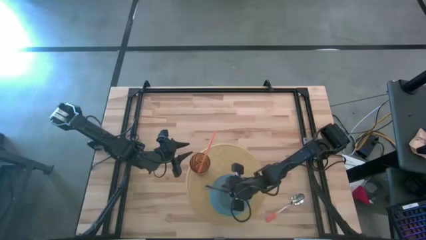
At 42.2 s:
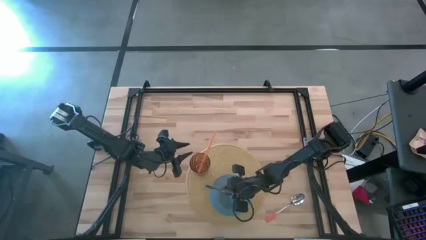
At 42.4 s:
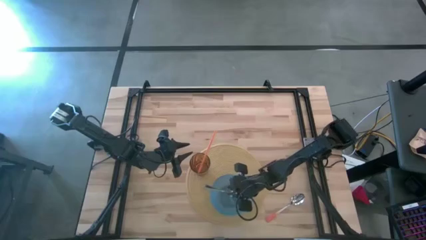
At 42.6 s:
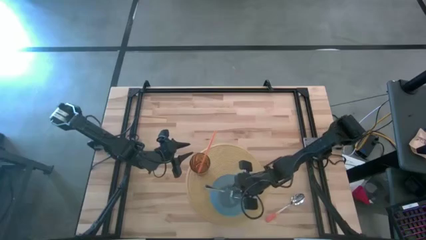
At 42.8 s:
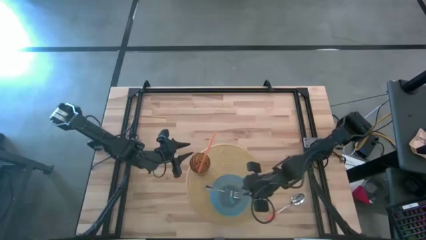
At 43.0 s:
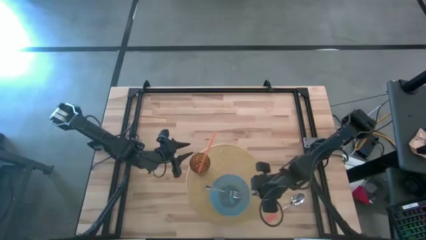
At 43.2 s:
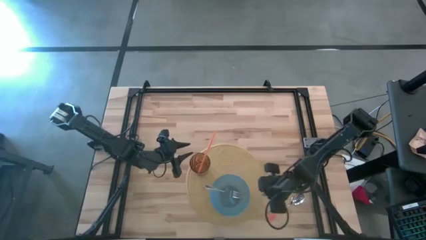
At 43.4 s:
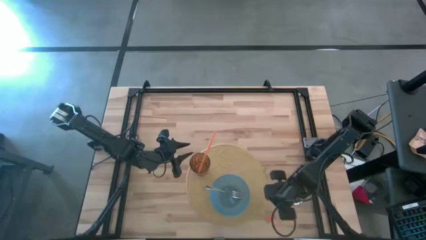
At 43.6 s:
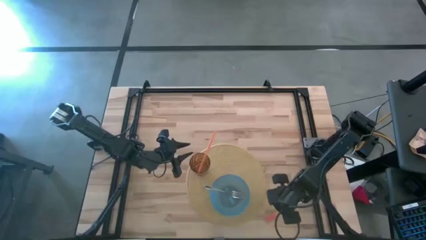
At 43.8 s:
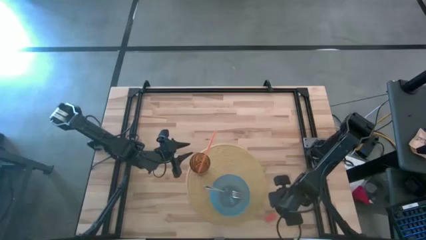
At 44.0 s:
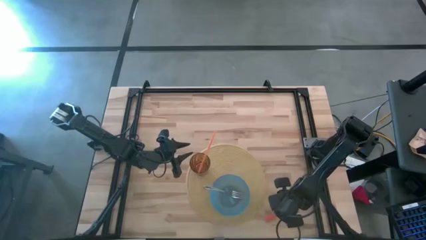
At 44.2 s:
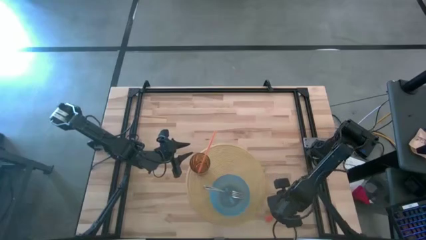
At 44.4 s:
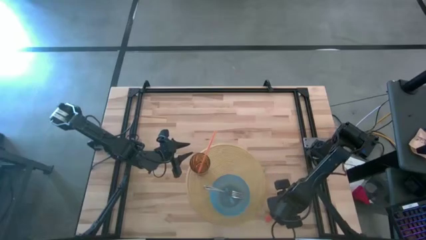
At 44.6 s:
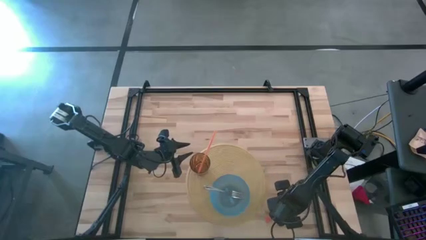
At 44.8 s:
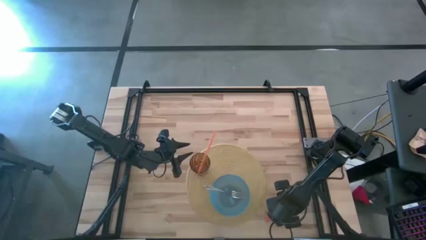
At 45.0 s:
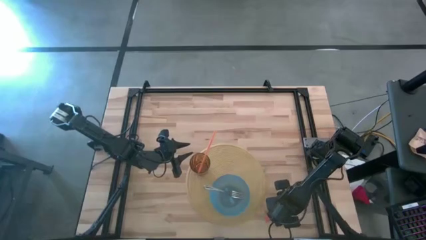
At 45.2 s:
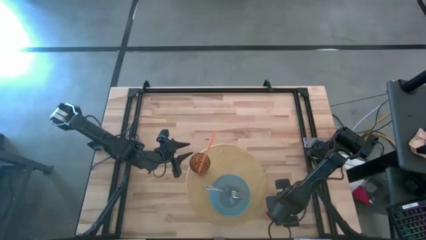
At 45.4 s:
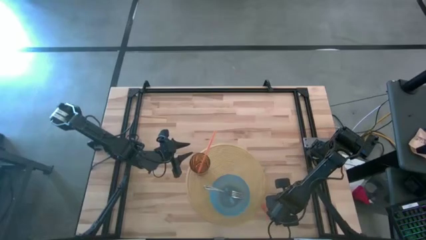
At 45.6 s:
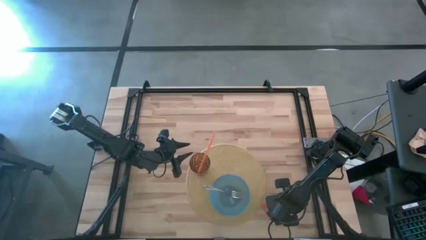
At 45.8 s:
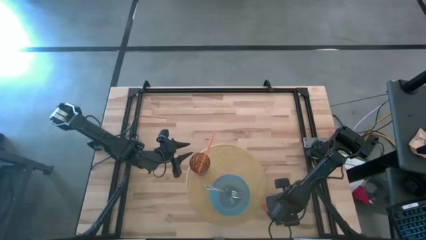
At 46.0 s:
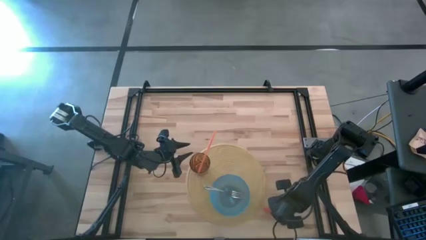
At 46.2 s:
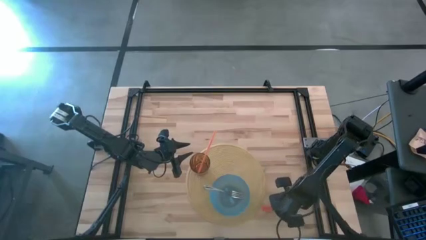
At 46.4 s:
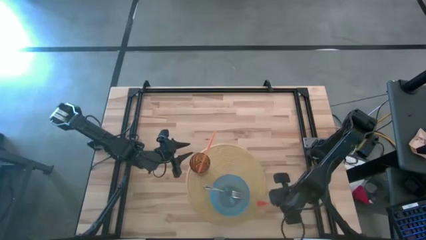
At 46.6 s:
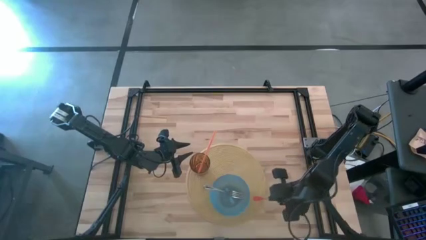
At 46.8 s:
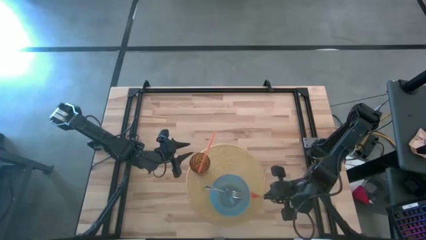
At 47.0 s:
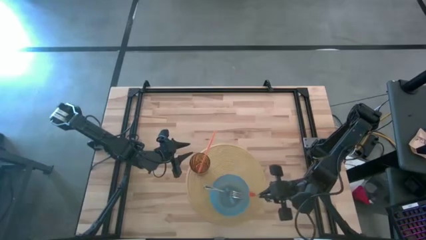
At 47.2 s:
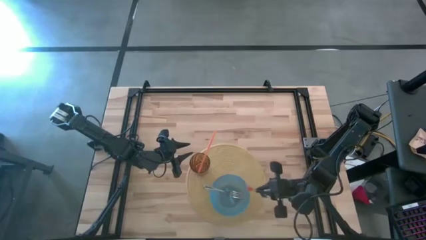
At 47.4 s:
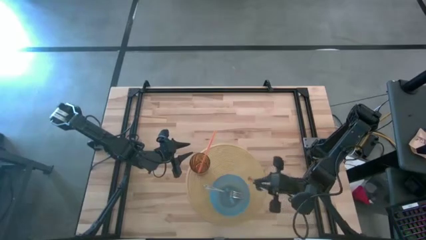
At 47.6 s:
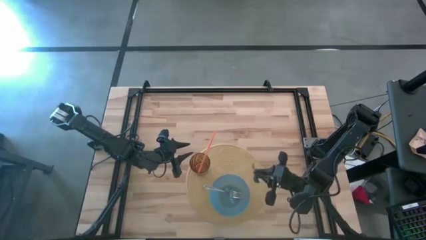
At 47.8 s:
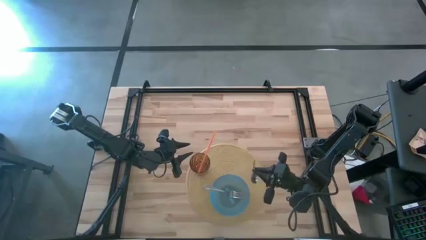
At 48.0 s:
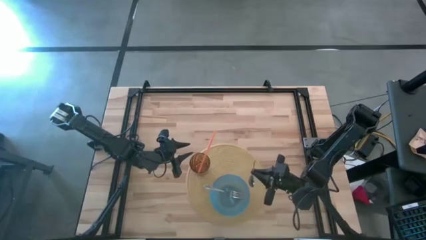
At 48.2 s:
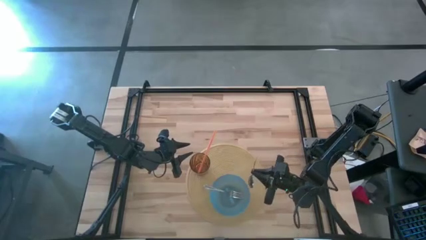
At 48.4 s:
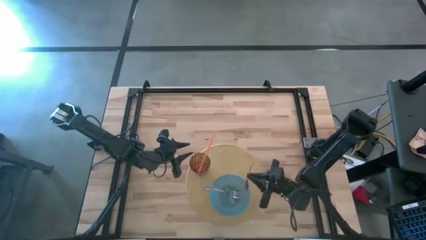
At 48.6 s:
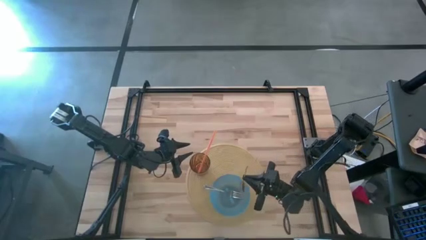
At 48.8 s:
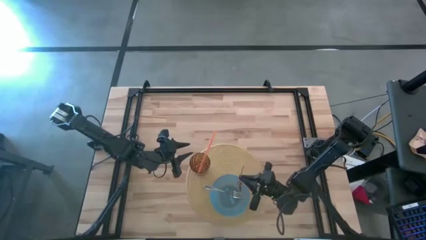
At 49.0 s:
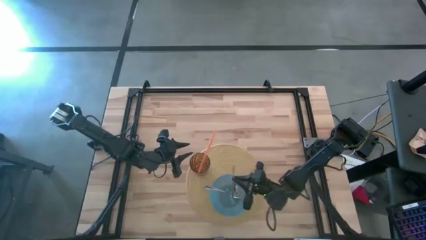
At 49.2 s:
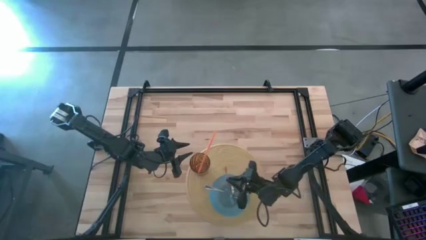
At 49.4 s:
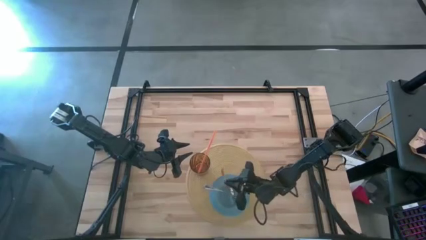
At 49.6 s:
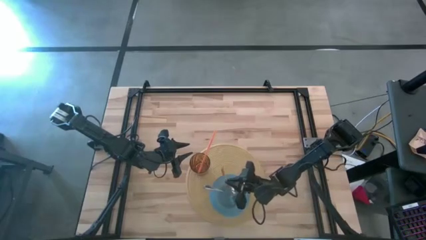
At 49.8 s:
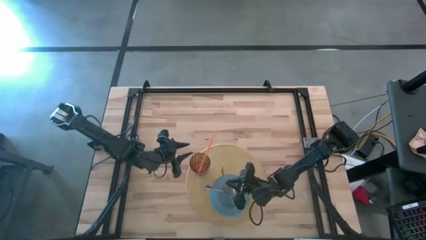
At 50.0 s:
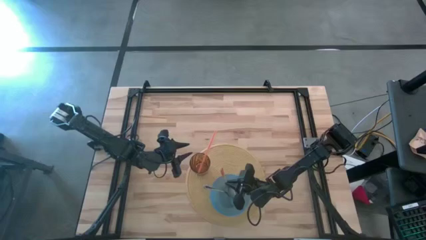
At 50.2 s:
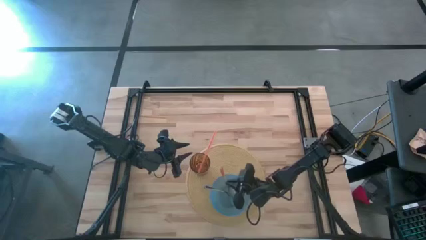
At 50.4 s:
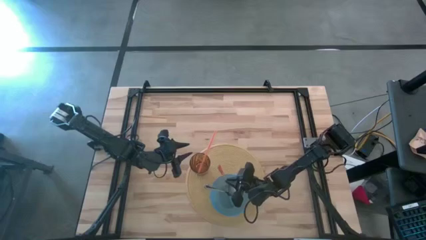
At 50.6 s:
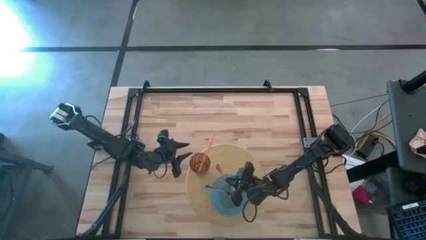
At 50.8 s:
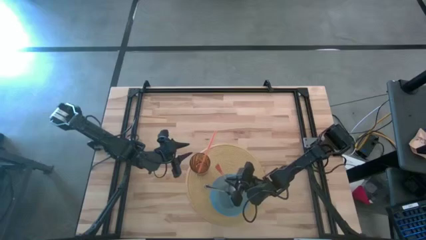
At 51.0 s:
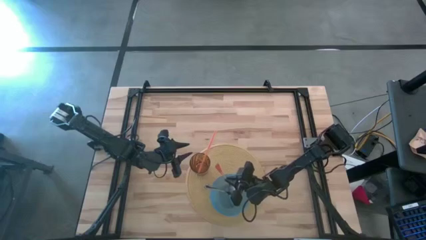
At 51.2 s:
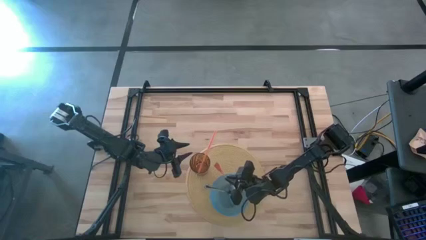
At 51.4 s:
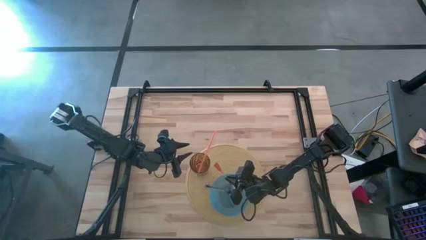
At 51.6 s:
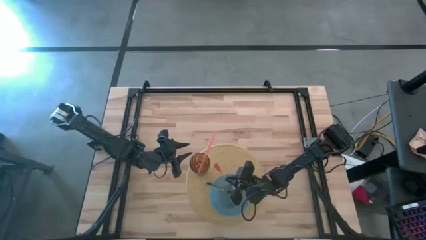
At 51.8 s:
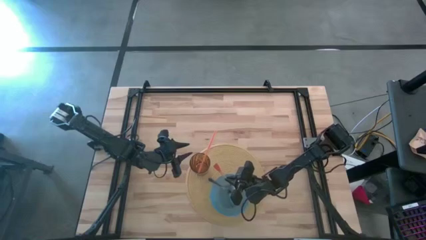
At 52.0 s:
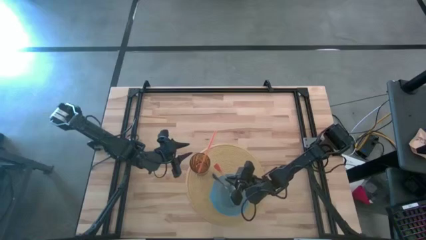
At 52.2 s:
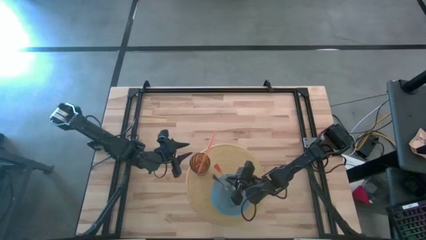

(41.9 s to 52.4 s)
Task: Pick & Place Utensil
Put the orange spoon into the blue bowl on the brown mat
